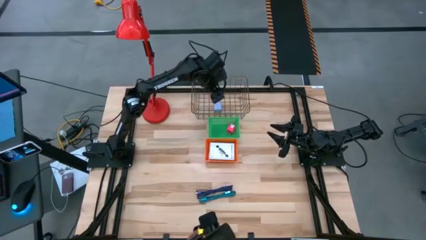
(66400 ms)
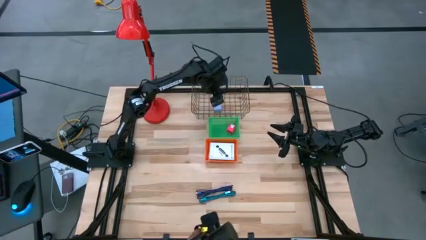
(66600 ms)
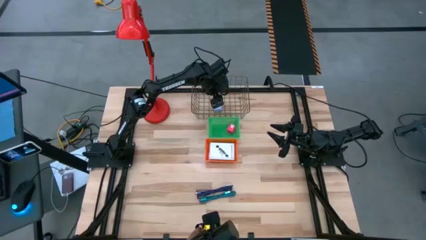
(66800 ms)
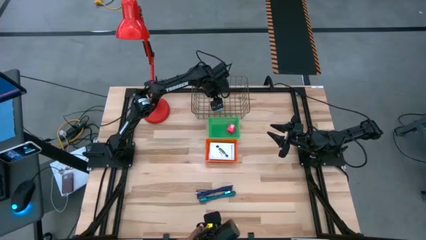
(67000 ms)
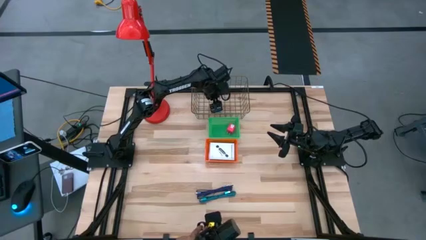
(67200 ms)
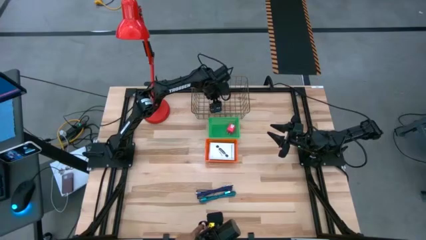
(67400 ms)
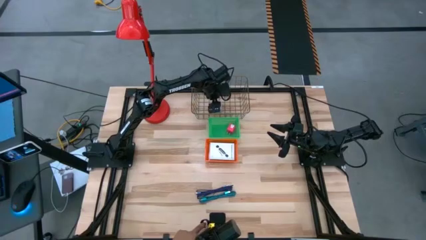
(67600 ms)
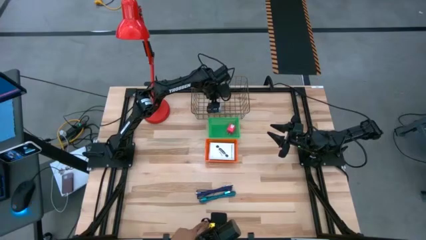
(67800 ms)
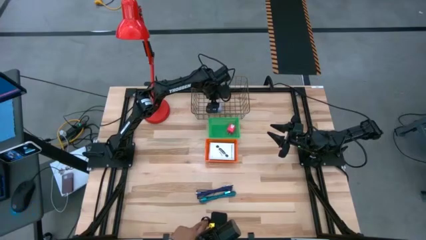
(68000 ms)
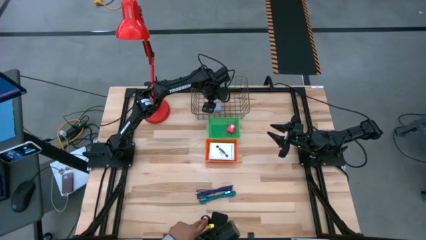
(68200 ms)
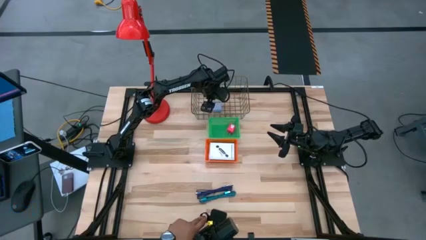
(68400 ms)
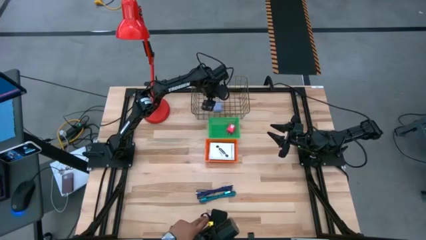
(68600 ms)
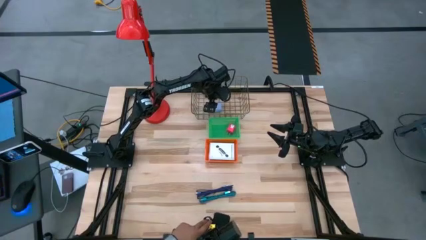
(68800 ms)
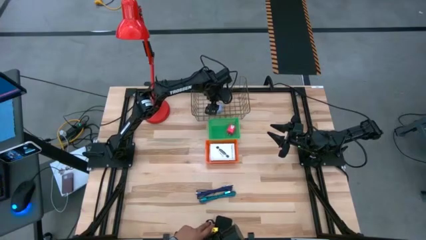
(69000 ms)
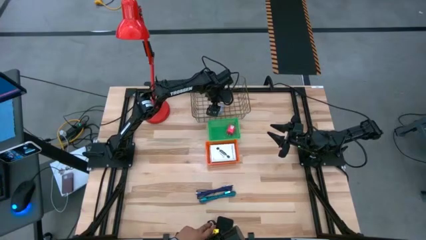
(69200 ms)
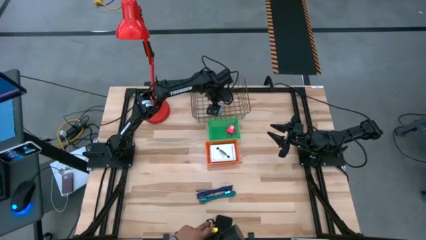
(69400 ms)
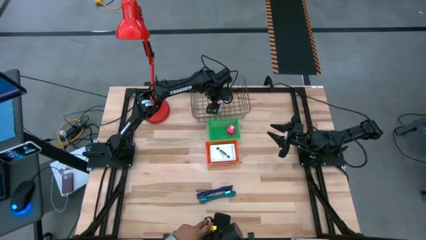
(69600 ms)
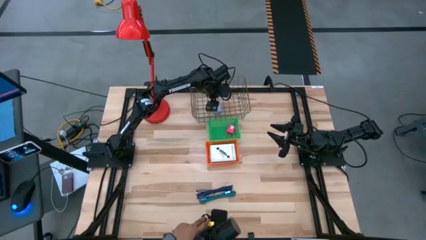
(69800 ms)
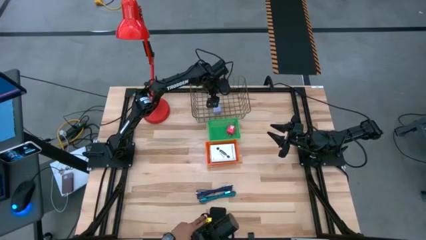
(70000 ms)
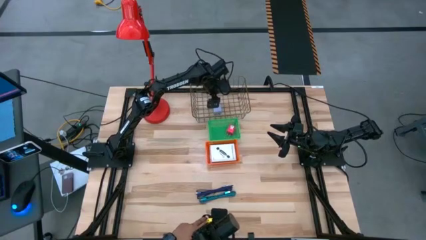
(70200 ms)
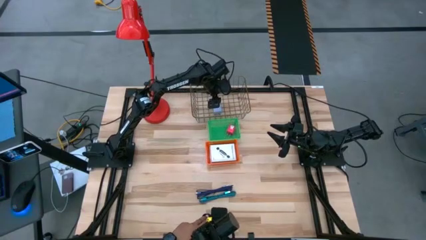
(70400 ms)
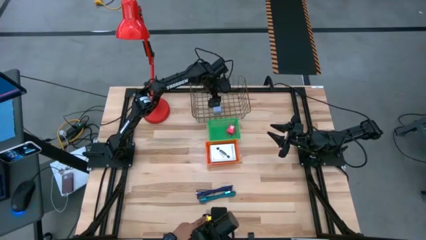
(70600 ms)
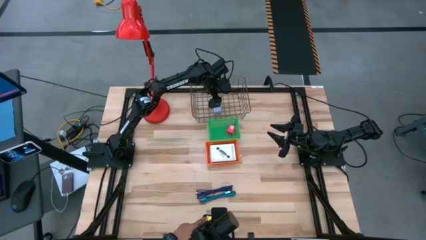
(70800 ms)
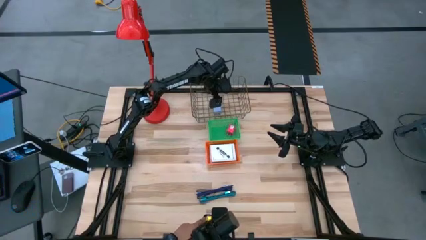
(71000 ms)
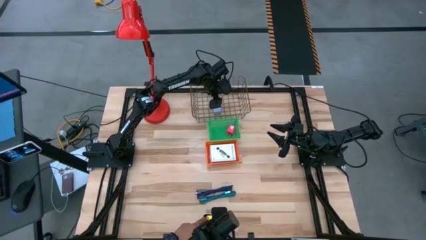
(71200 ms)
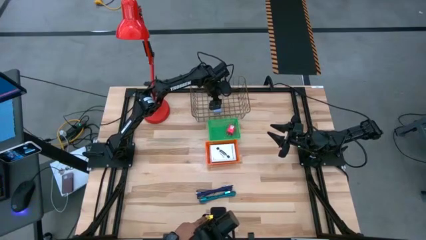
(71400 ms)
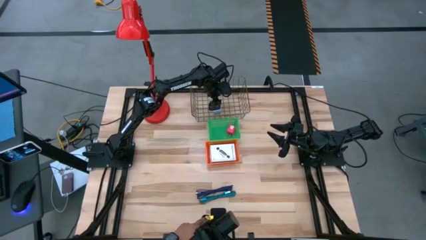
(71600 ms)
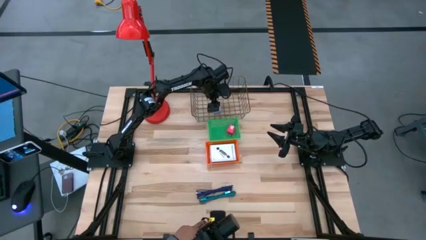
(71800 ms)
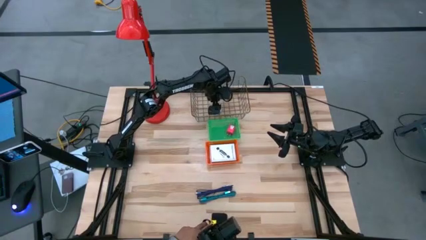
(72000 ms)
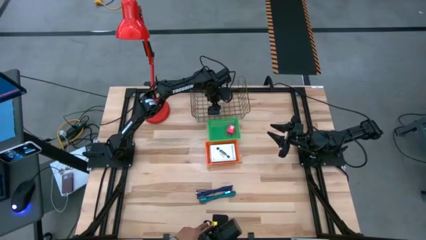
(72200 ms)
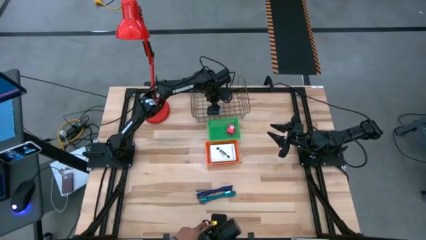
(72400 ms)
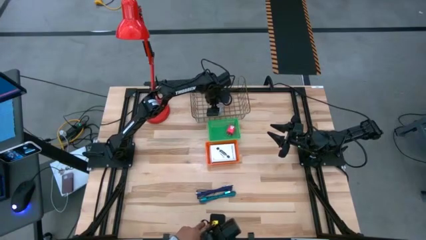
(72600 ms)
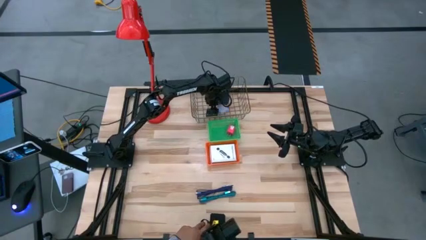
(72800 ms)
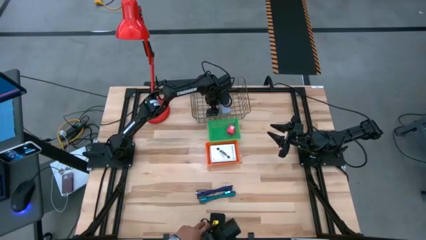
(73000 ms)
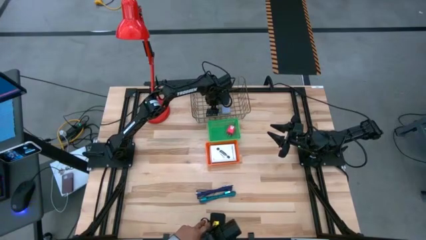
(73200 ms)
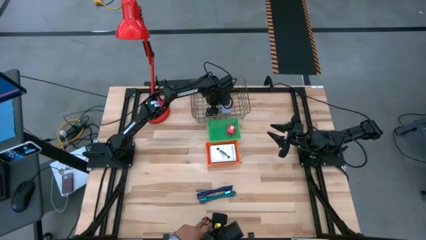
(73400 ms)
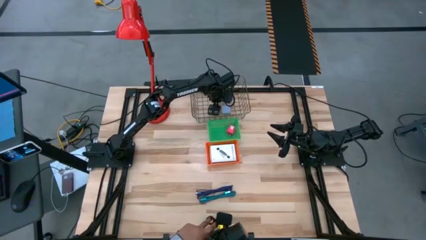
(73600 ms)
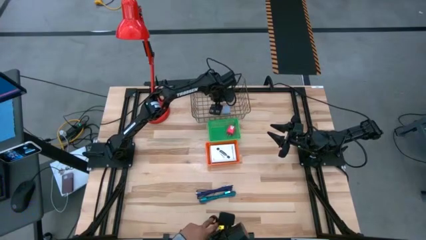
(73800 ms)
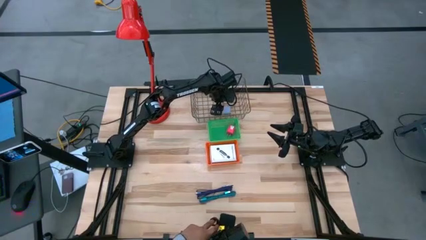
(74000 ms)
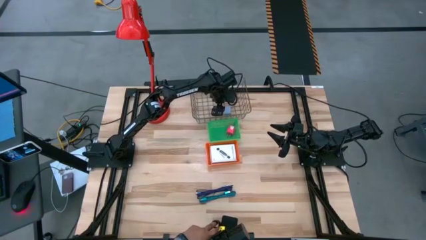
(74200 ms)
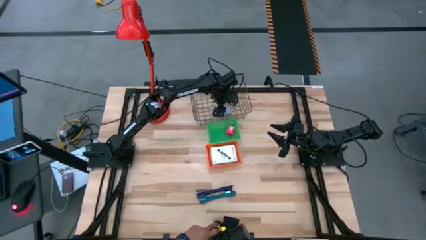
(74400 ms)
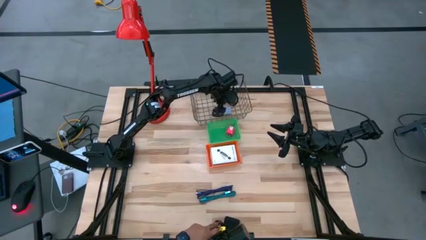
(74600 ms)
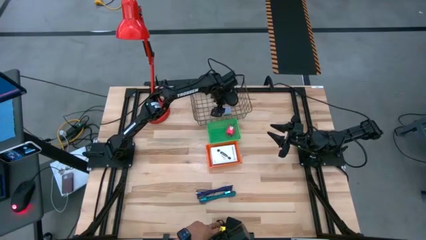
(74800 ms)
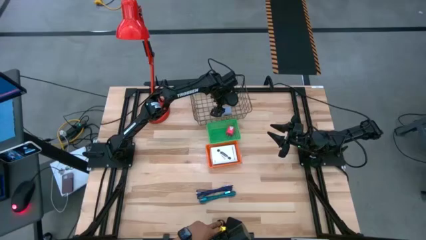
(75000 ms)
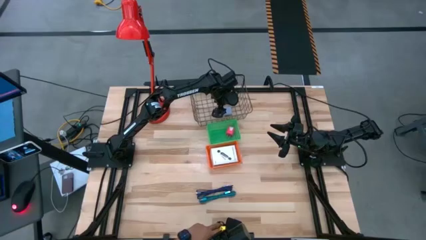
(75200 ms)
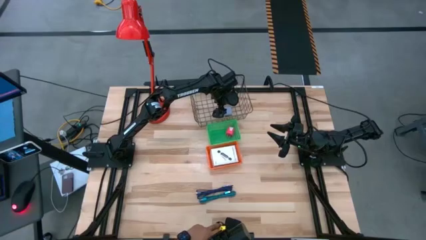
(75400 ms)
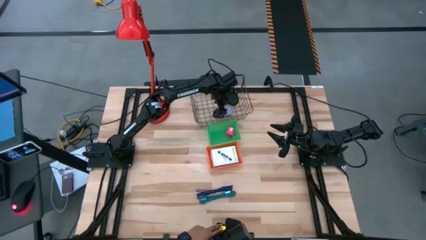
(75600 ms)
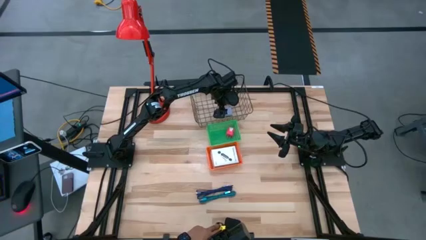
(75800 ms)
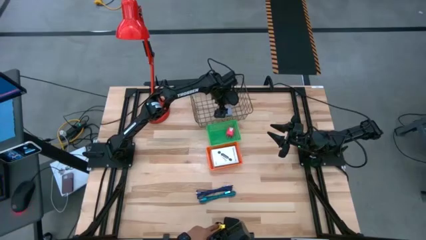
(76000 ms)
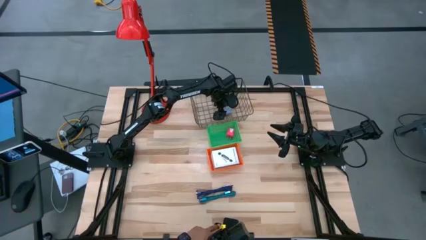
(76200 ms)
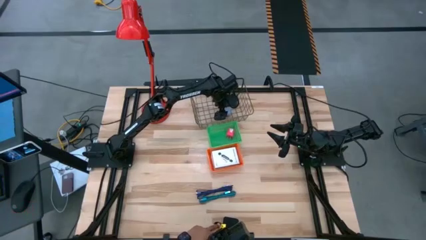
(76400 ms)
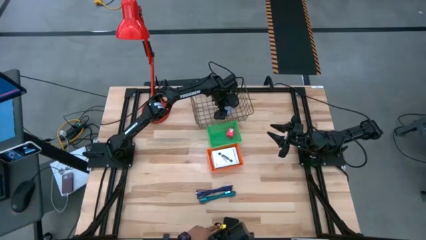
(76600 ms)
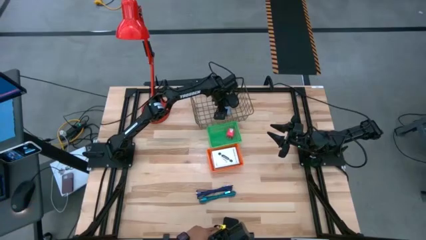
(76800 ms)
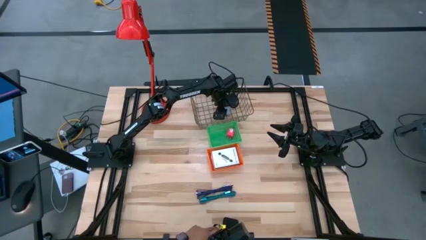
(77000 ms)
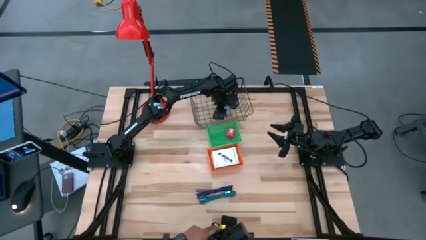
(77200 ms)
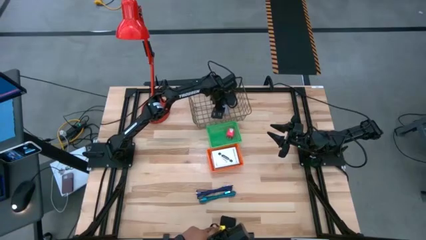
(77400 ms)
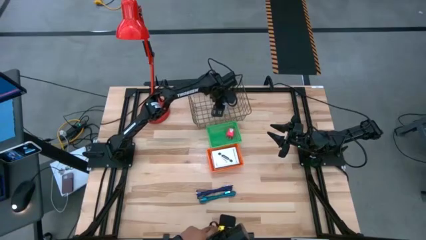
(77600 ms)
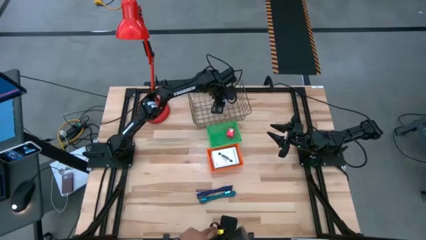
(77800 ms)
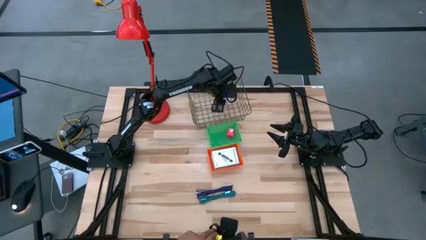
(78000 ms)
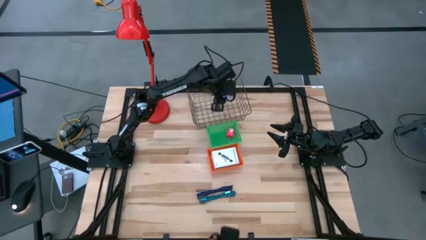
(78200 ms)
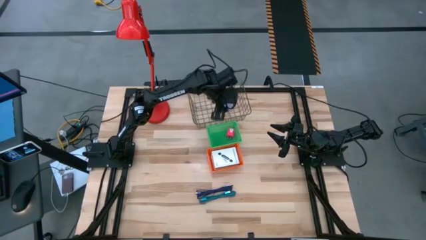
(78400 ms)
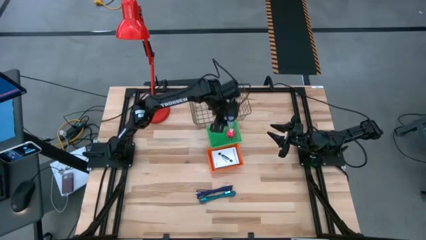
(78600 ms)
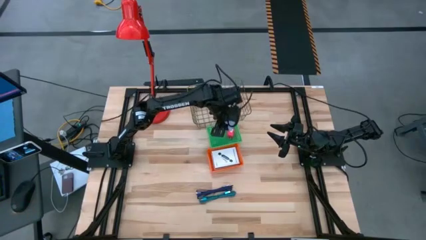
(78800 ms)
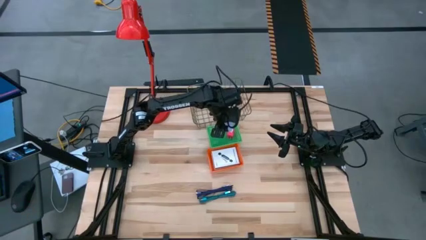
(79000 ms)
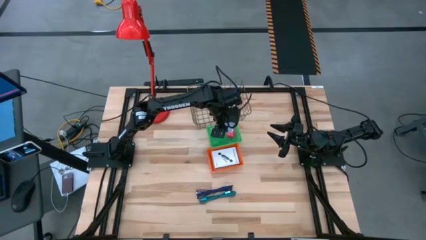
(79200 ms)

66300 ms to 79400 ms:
Task: Pick and place items into bin
Put the blue charger adapter into the green basket

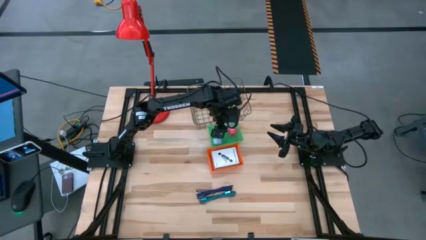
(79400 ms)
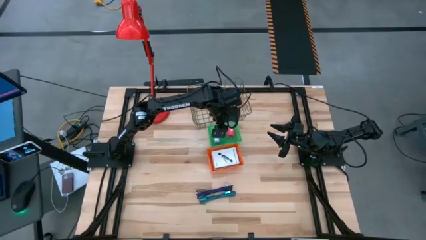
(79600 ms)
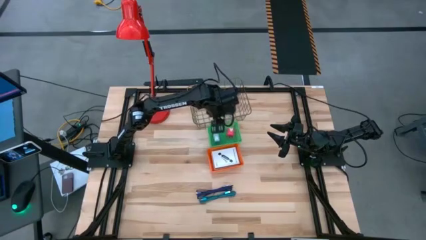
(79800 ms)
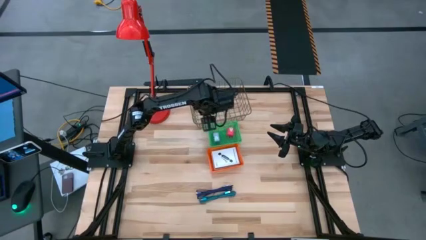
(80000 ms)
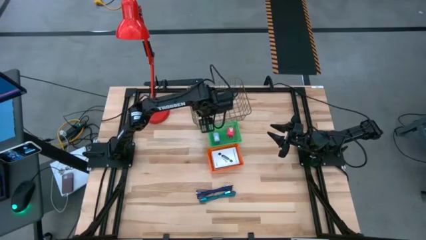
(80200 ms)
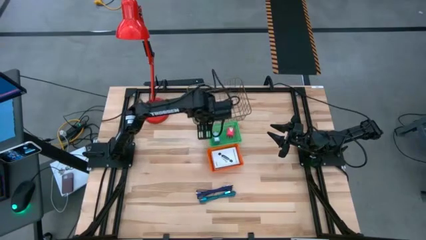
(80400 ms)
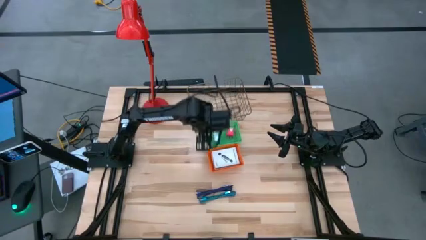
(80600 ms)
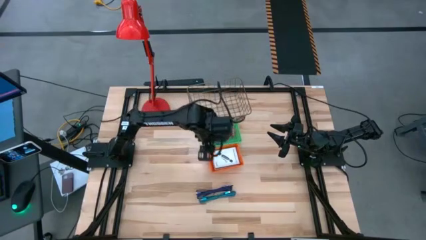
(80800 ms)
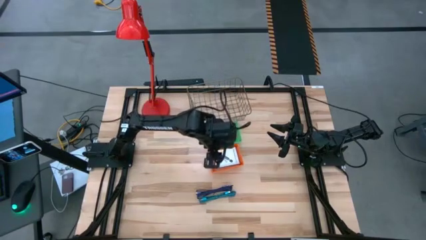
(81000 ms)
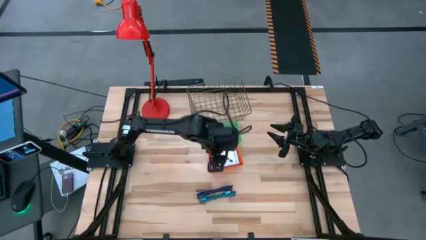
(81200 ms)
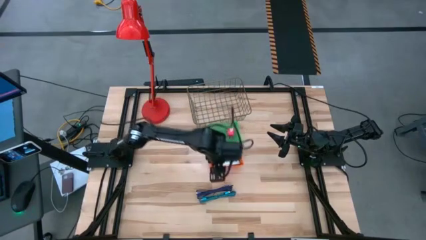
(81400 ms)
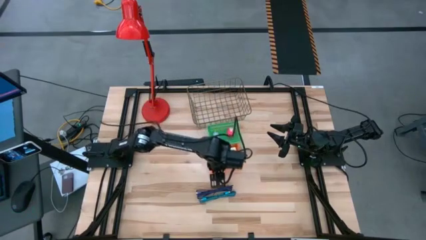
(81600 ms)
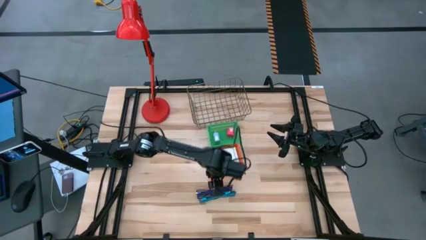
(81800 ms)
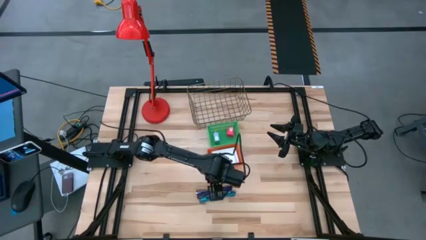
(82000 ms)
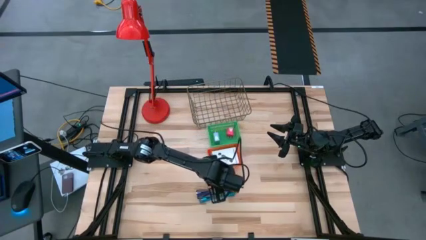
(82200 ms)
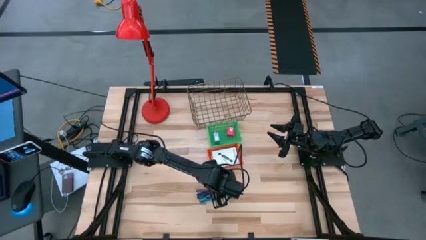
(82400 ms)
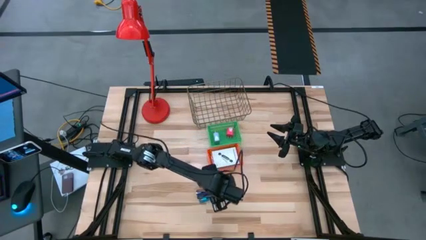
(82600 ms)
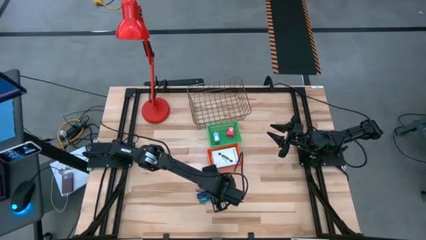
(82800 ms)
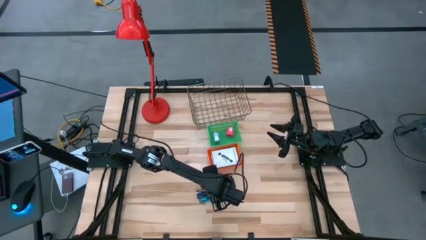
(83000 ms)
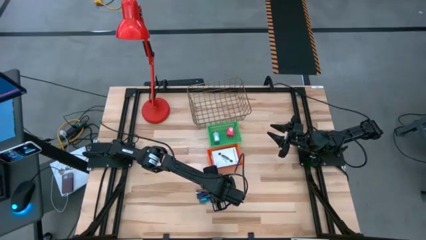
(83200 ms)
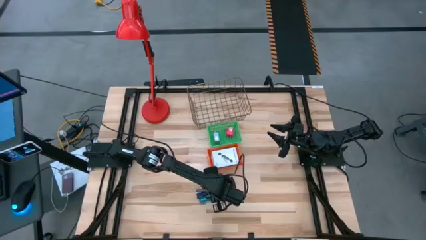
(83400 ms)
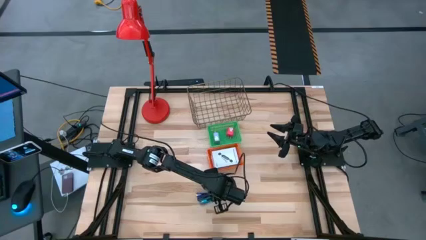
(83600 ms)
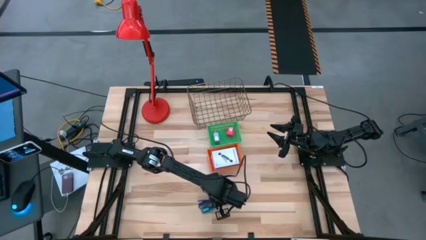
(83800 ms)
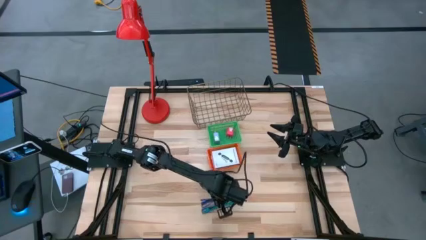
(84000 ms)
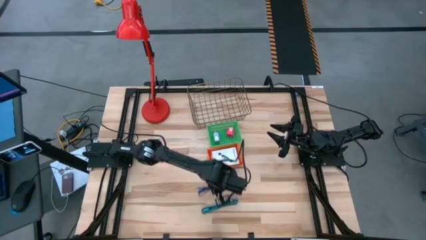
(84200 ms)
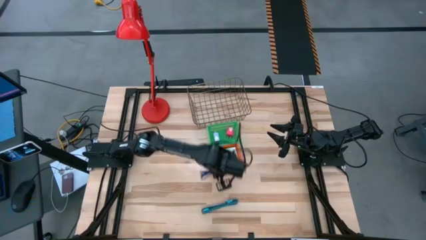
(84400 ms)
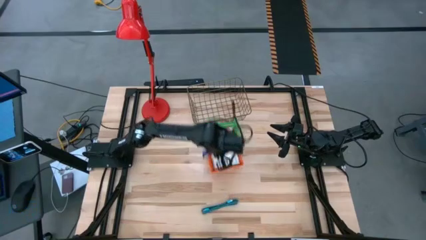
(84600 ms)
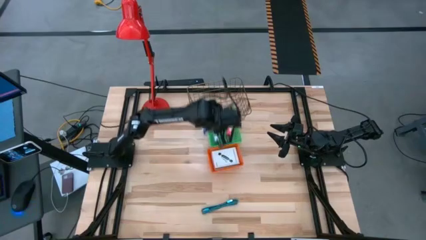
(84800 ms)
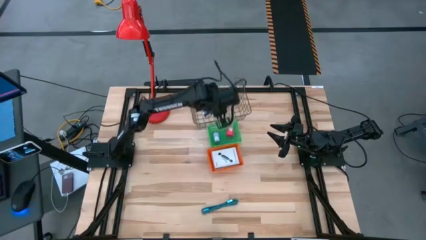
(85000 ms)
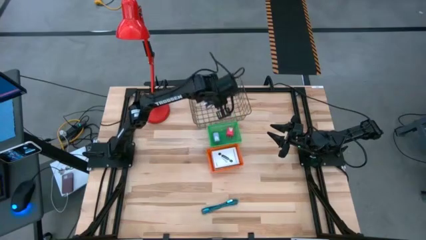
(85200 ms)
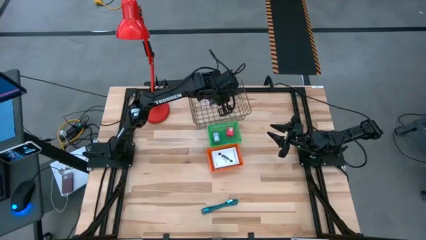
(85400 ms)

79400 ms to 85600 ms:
Put the blue charger cable into the gold wire basket
